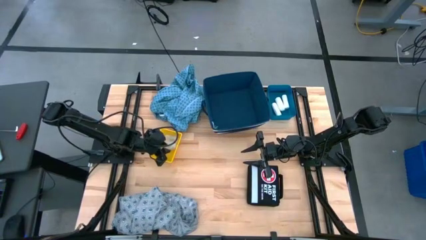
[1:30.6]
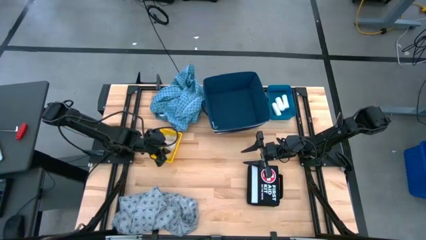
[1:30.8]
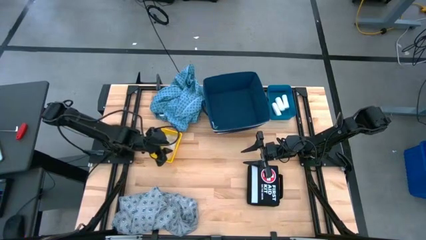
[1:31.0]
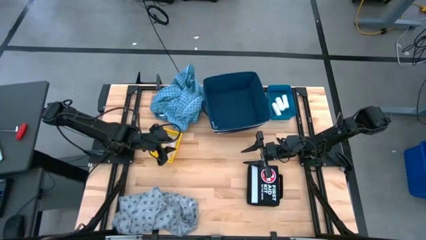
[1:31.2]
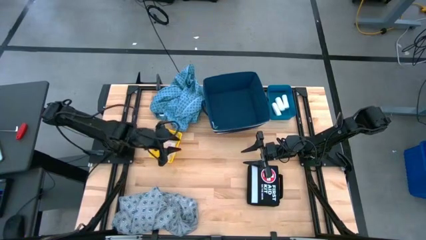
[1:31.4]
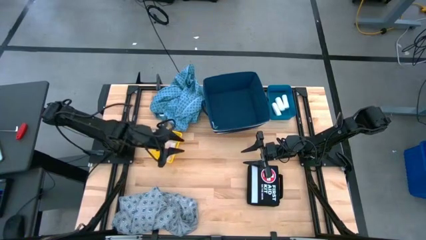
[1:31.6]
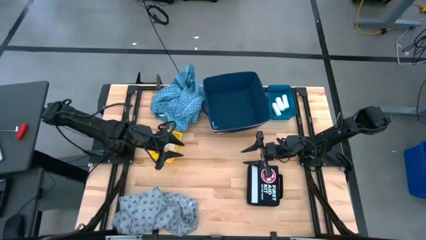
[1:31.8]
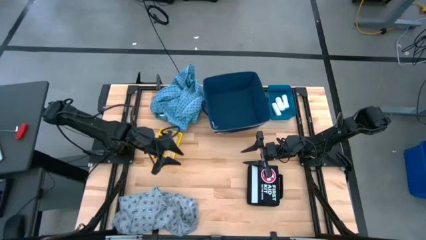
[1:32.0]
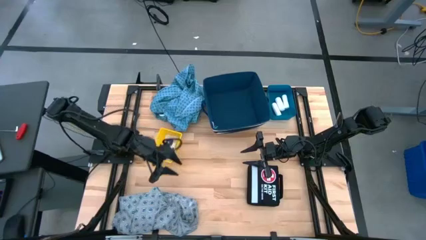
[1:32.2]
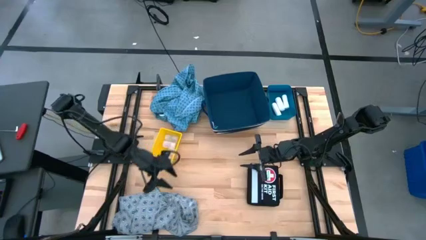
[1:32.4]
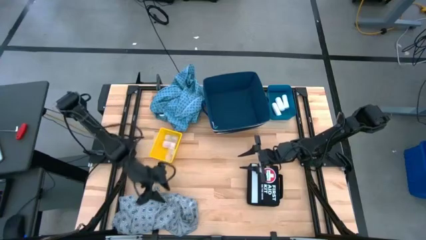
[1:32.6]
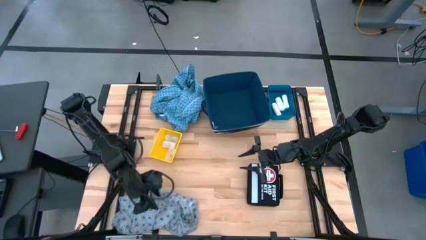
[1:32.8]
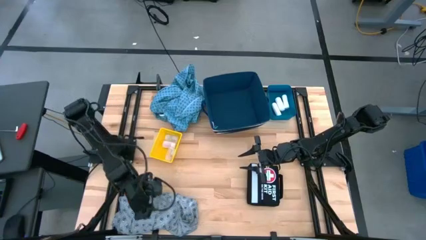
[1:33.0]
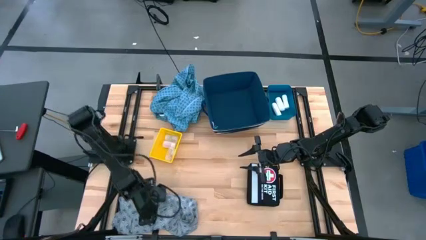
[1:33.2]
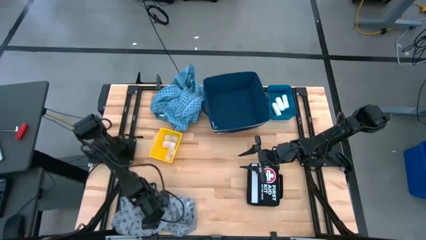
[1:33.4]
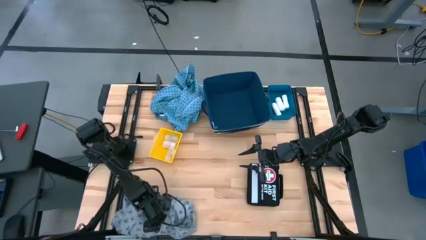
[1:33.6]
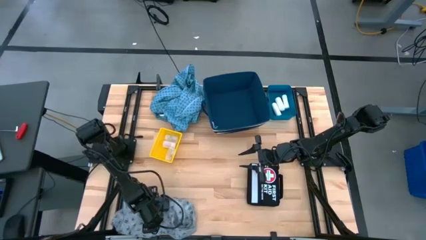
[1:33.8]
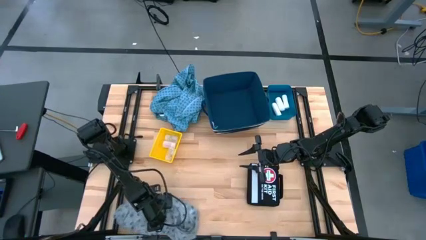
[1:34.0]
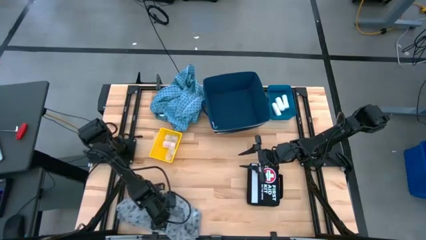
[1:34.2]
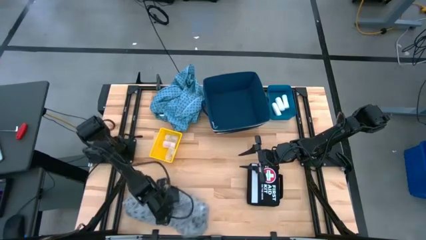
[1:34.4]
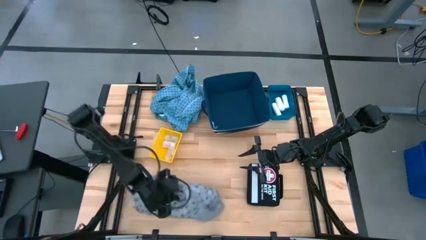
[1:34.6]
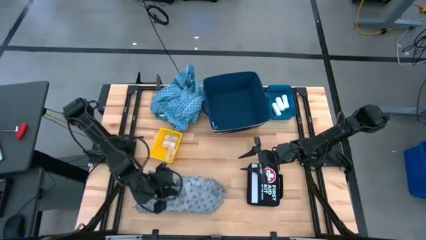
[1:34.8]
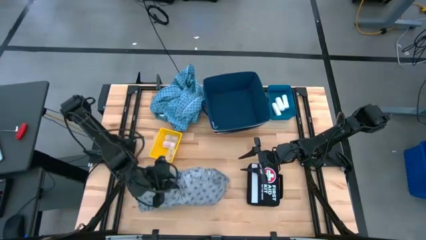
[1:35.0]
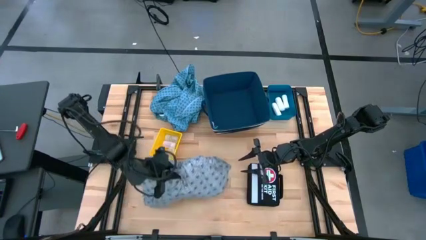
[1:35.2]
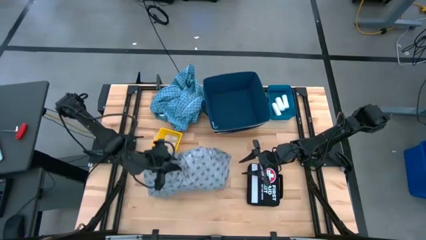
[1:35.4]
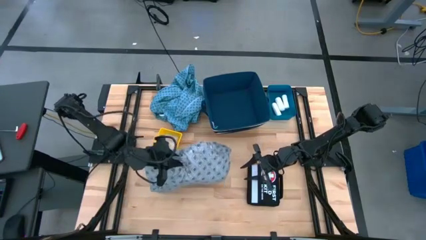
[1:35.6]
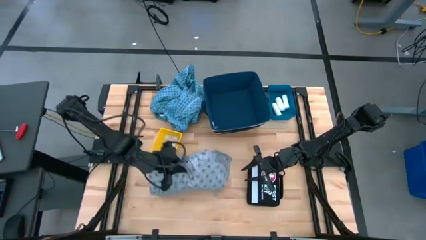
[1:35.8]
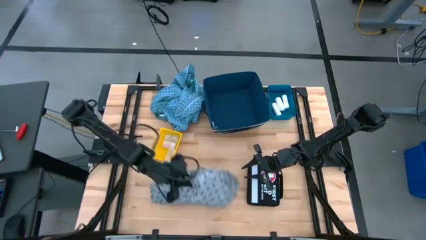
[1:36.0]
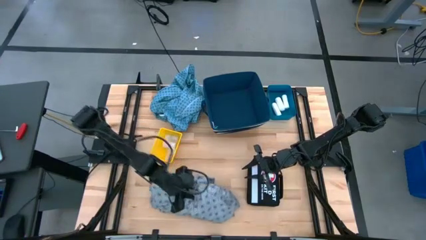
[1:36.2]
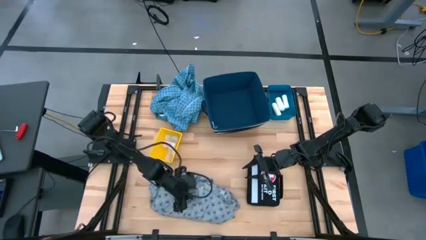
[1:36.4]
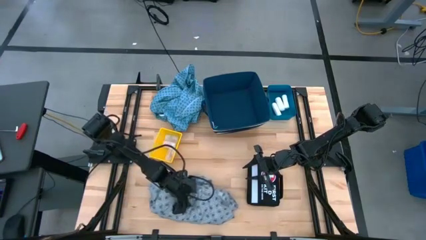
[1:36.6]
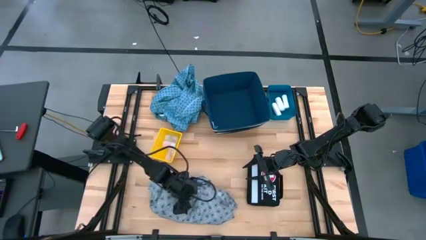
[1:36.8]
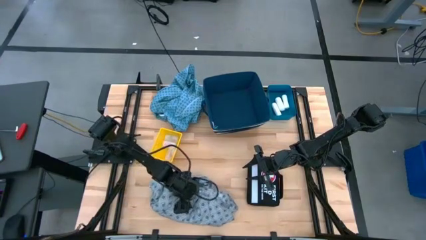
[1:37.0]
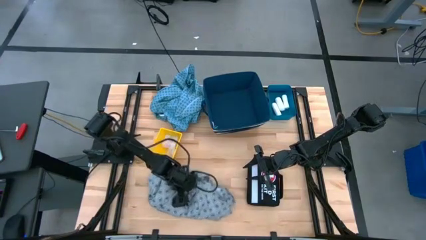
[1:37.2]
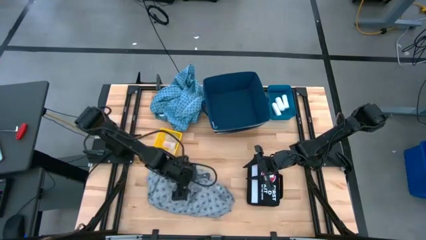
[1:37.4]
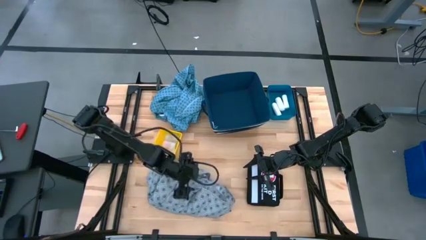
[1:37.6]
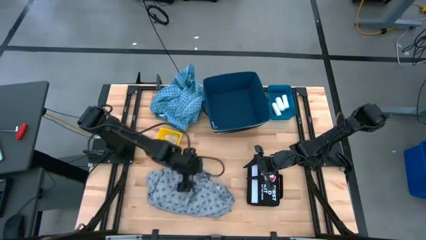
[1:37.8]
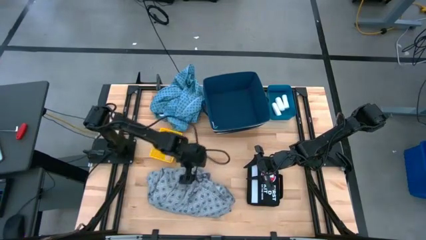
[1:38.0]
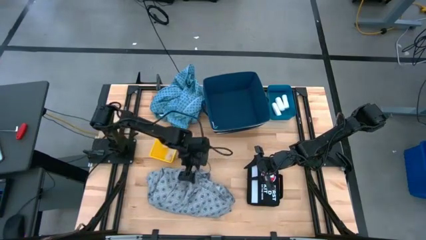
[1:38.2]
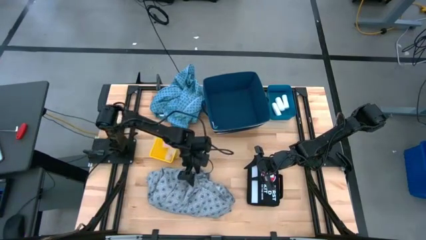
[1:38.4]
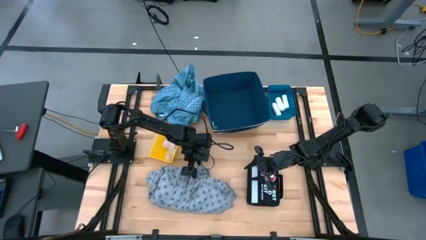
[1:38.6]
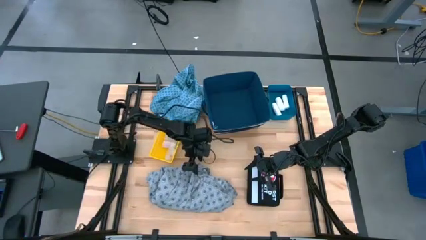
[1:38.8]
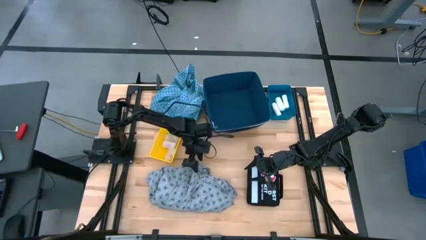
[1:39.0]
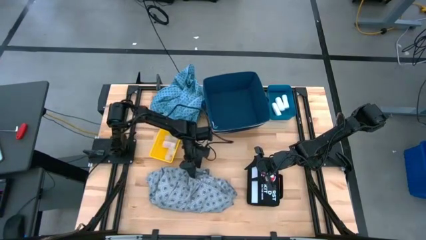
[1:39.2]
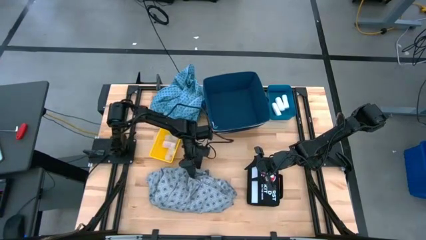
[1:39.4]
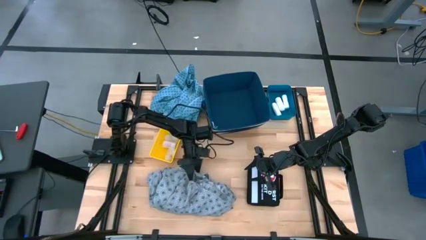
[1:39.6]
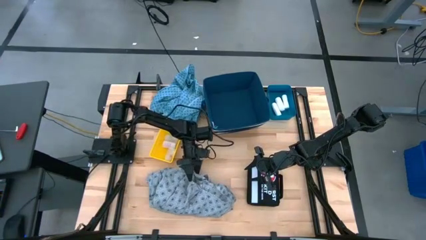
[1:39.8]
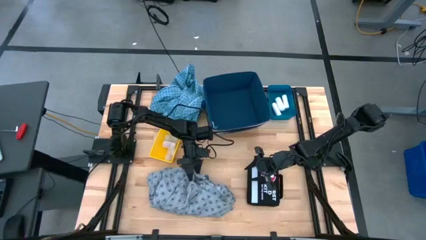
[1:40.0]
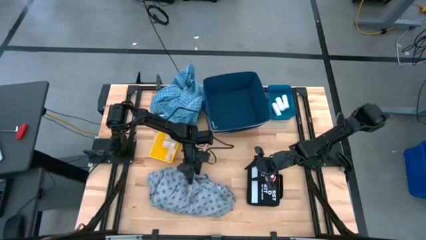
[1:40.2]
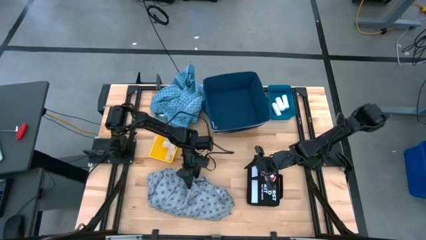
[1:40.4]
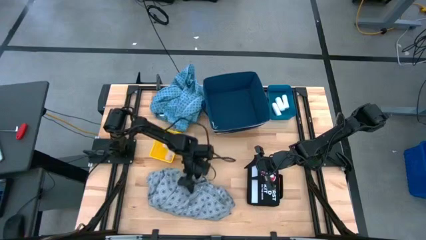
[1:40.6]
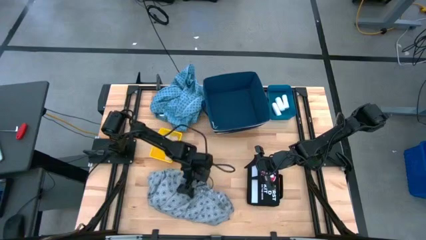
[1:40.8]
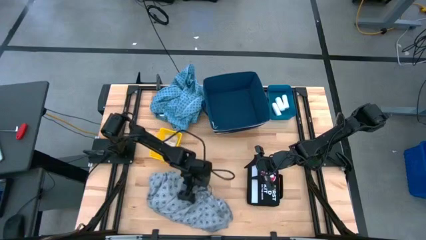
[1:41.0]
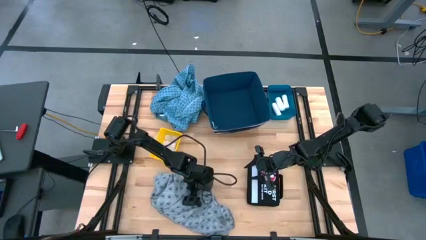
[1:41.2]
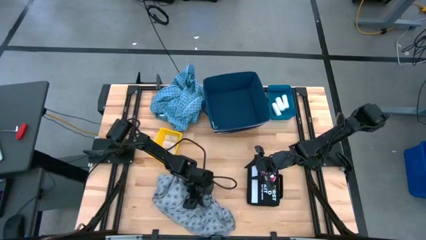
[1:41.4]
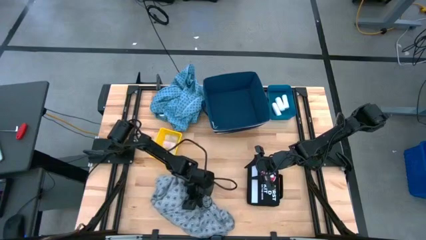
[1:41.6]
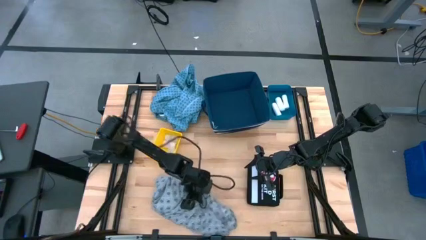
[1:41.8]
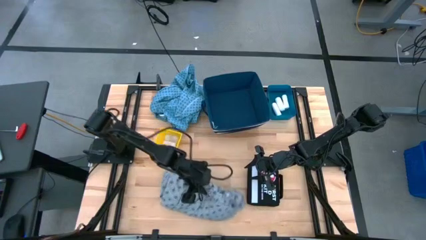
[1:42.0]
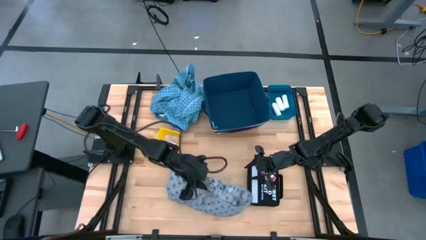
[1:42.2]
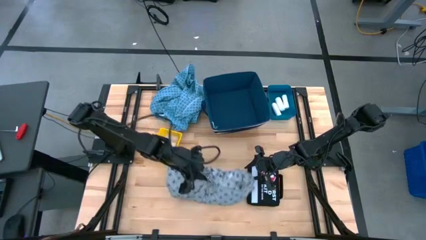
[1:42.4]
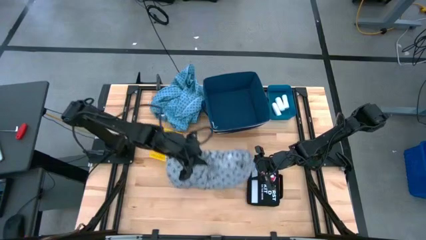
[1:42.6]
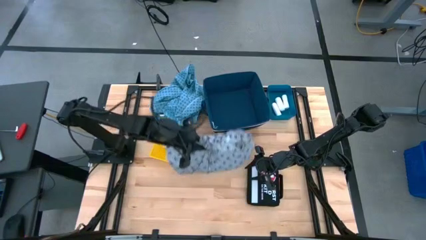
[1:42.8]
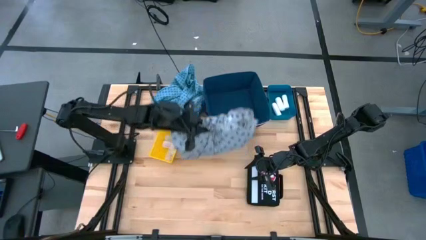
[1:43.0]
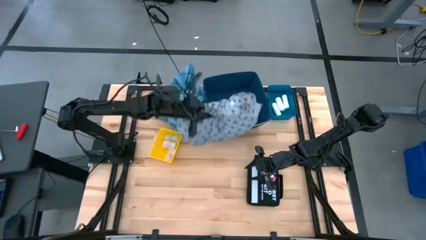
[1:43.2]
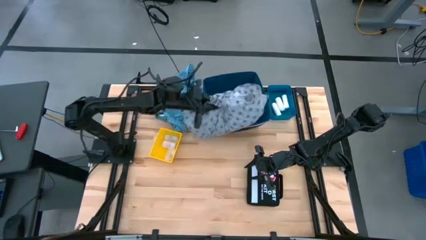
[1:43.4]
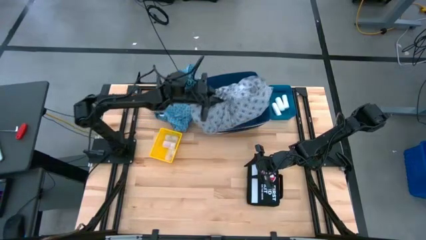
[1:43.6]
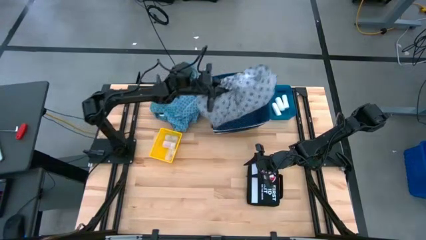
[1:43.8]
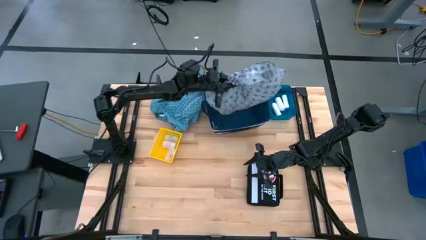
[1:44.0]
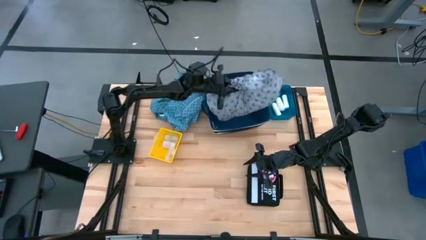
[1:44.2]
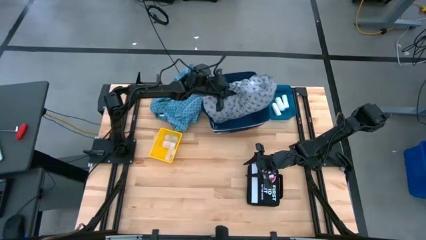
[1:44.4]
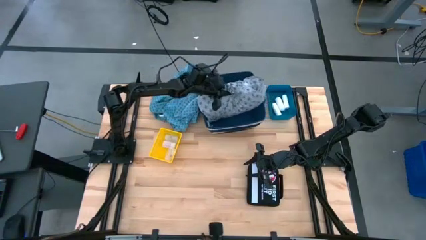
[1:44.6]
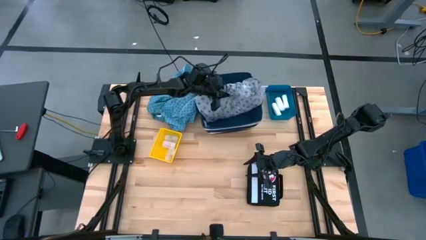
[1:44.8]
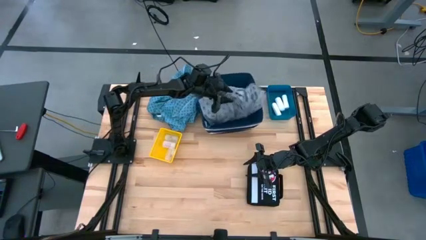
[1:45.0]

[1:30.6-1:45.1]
Task: Pick & place medical supplies in basket/bin
Put the gray patient gown into the blue laundry organizer
